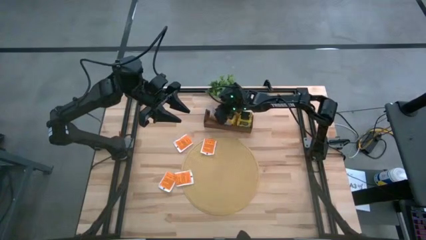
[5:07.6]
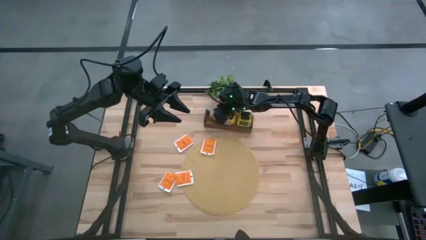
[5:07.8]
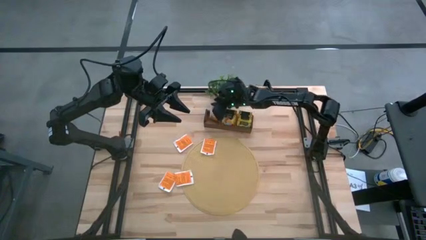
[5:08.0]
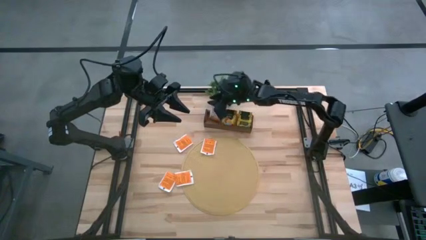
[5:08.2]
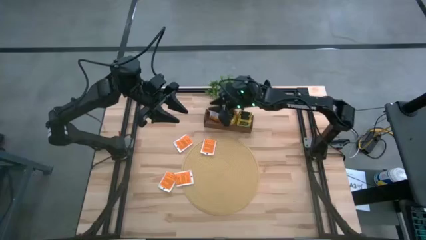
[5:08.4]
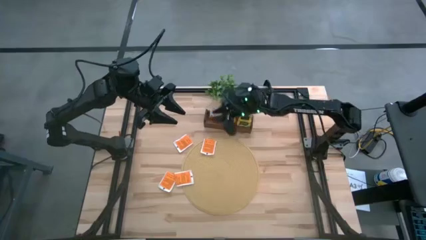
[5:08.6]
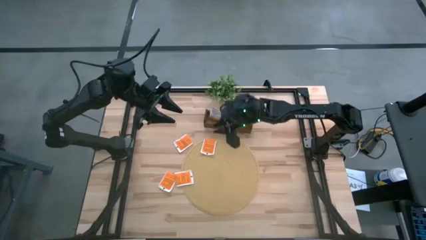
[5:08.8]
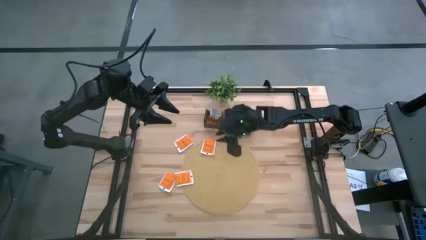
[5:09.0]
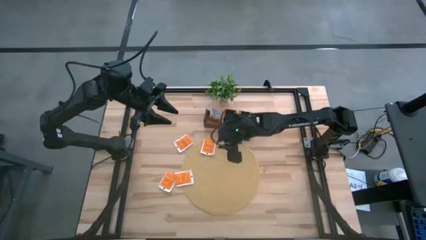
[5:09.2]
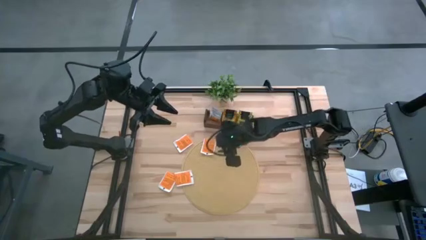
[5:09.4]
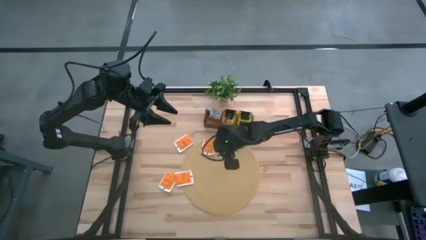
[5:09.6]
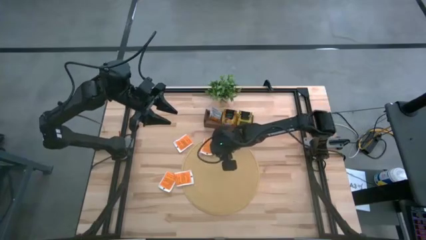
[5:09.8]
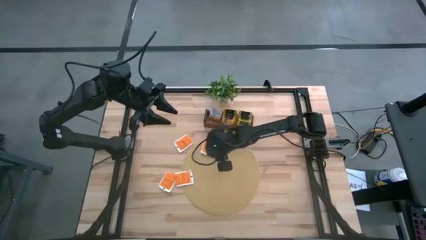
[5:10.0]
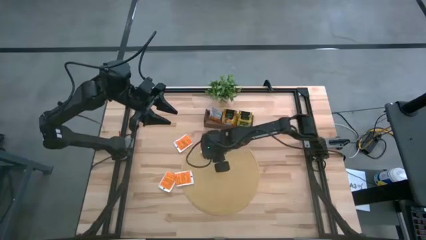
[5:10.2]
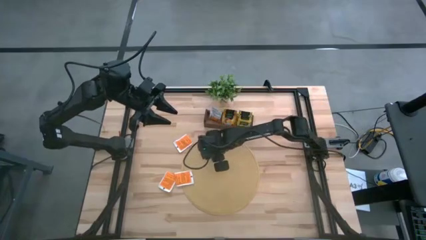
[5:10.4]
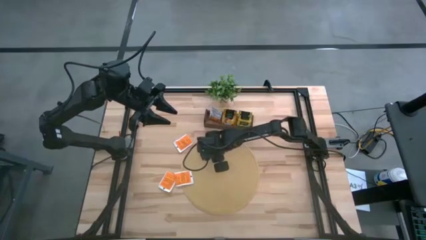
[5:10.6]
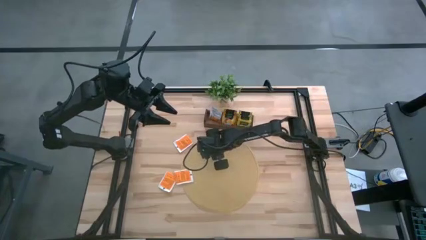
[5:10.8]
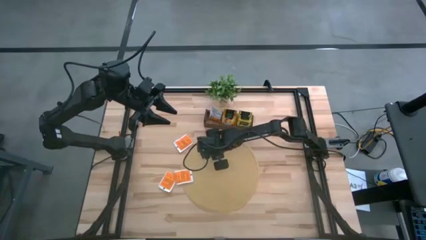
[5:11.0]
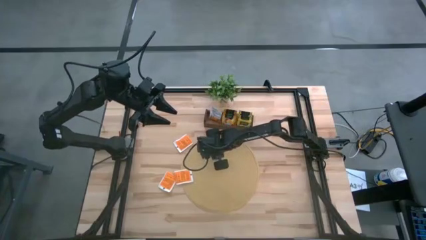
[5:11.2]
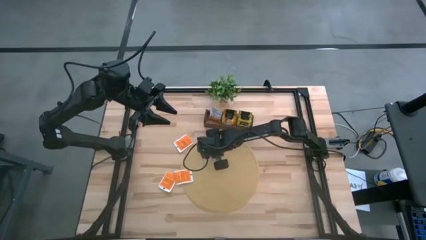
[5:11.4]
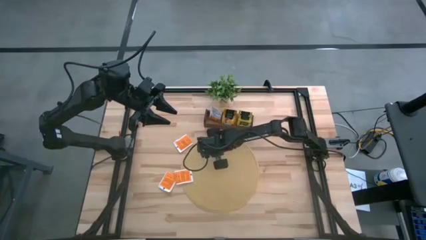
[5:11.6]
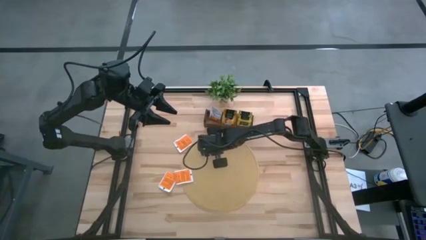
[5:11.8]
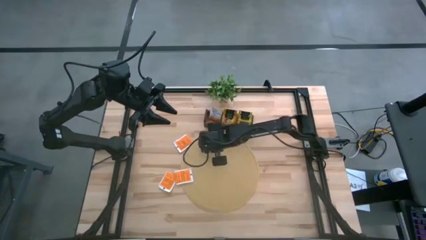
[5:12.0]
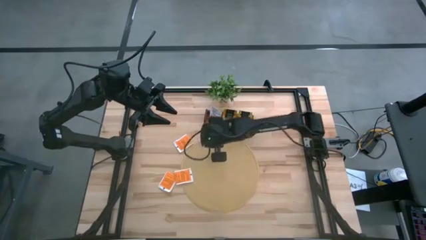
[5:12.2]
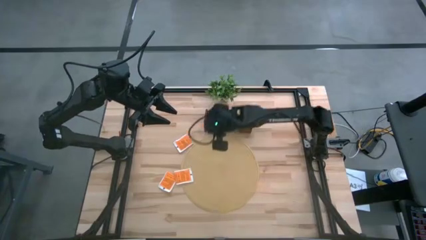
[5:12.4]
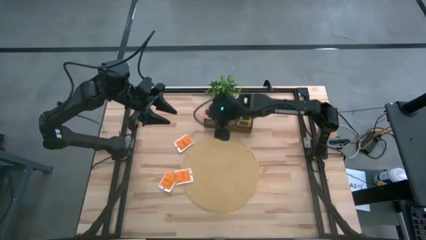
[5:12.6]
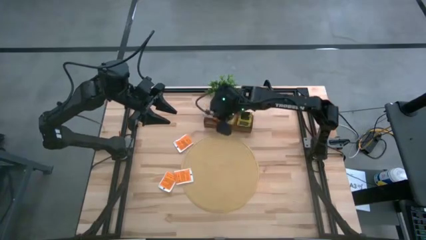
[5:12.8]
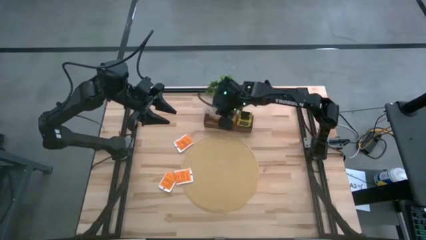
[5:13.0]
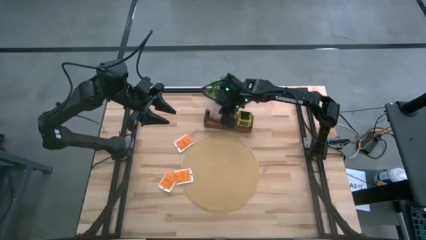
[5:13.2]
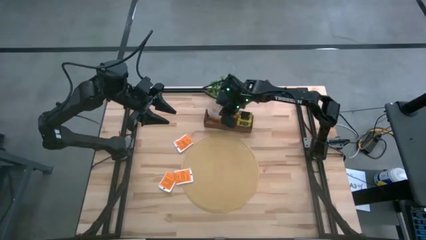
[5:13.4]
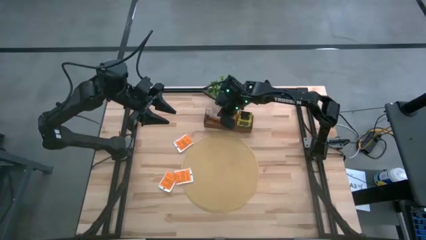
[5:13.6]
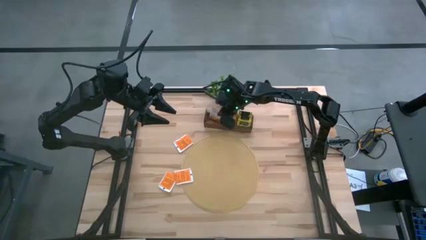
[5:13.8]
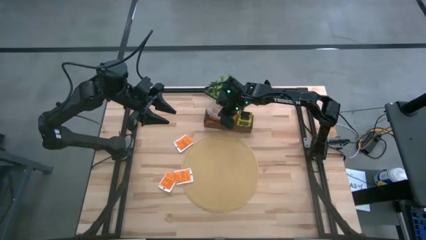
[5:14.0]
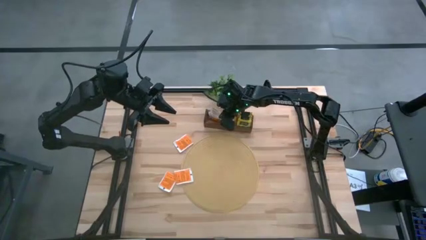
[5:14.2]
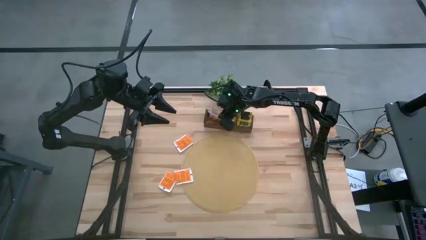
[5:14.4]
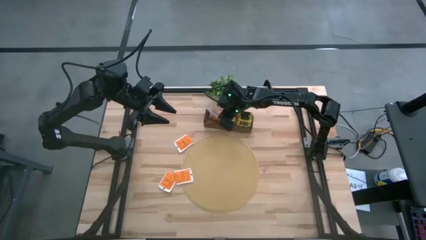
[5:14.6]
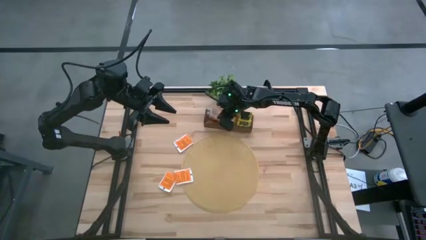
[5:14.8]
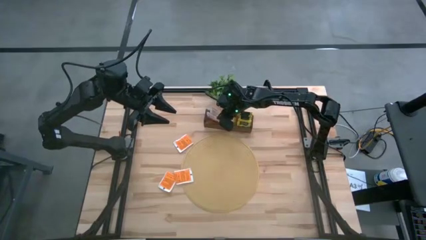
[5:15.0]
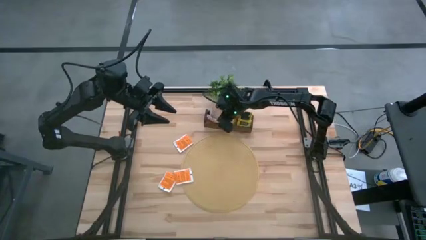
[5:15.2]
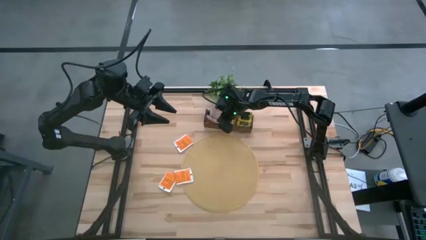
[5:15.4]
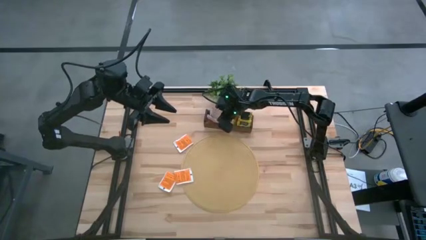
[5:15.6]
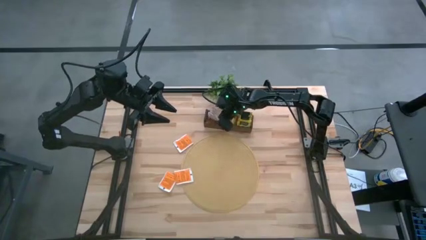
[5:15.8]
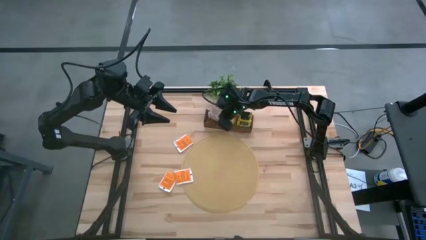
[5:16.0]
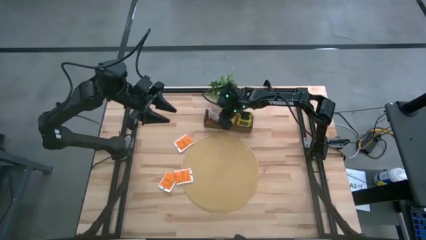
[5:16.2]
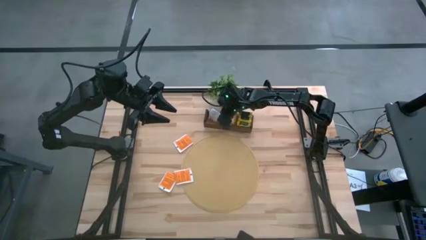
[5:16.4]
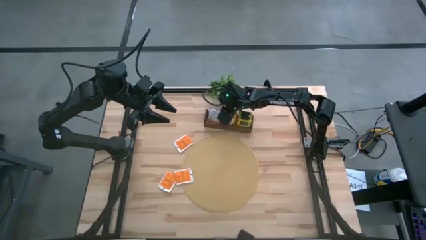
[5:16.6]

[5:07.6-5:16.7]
Task: Pick & Place Tea
Put the white tea bag into the left section of the wooden organizer

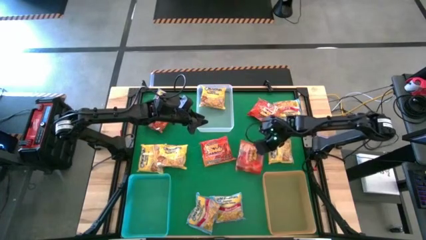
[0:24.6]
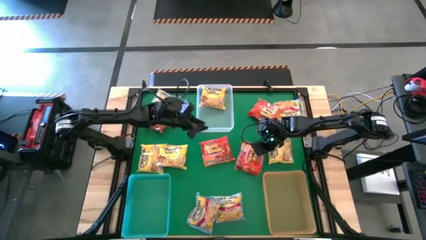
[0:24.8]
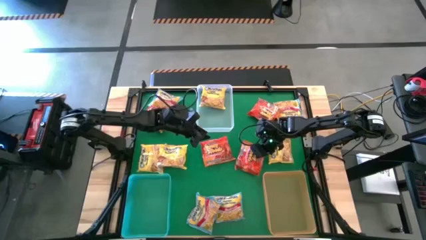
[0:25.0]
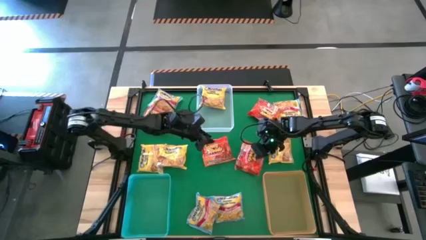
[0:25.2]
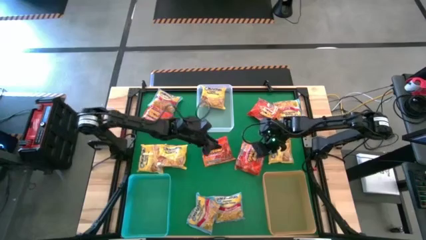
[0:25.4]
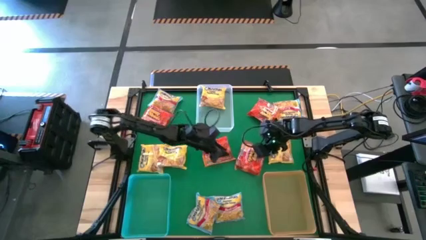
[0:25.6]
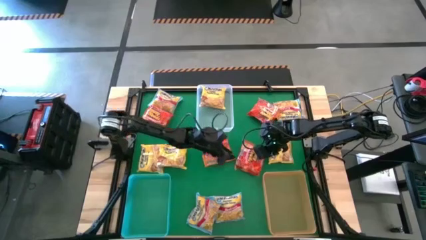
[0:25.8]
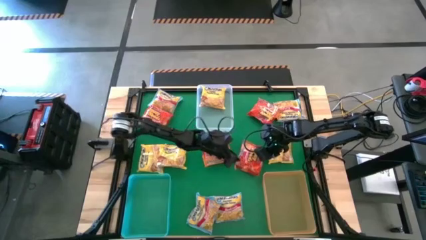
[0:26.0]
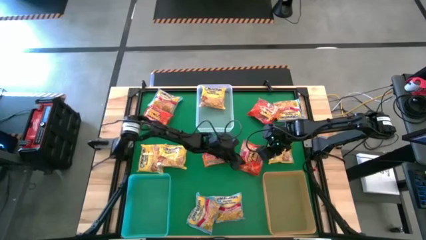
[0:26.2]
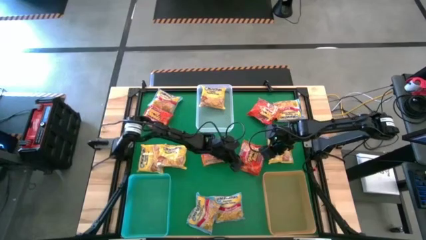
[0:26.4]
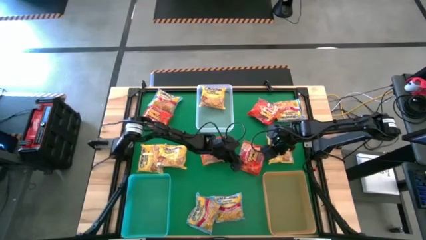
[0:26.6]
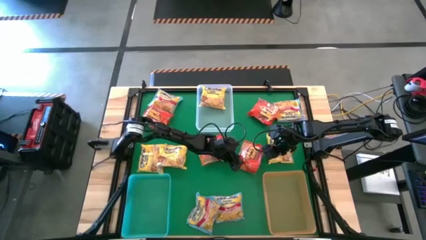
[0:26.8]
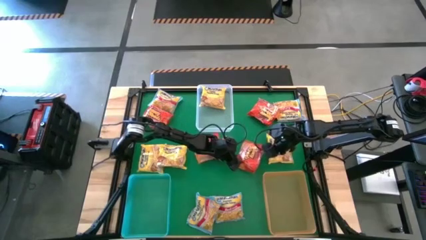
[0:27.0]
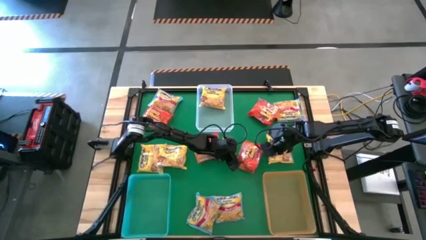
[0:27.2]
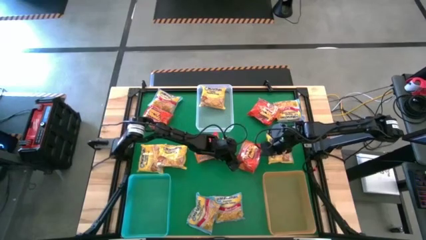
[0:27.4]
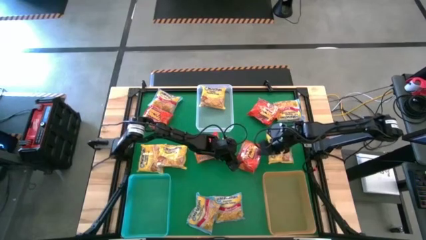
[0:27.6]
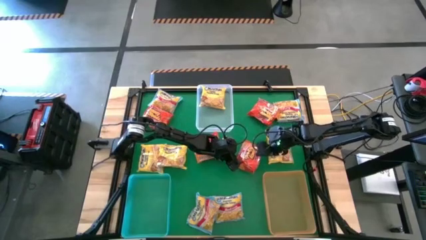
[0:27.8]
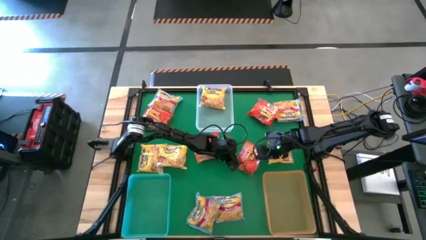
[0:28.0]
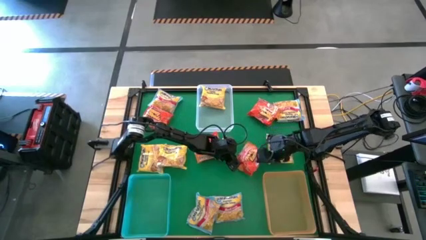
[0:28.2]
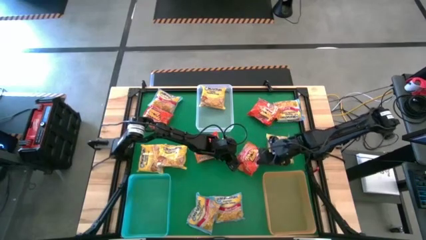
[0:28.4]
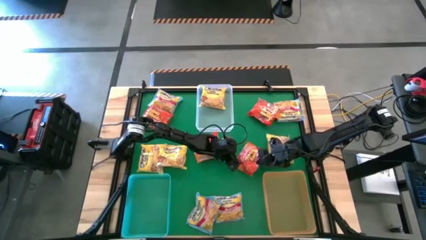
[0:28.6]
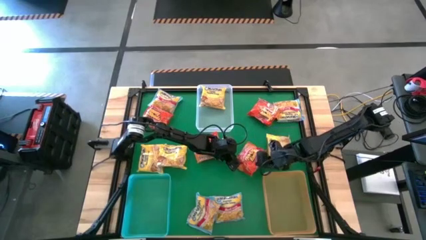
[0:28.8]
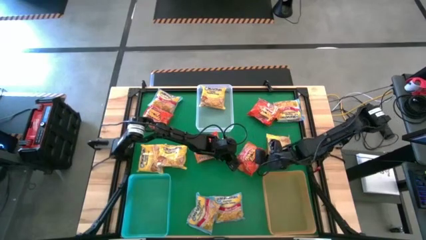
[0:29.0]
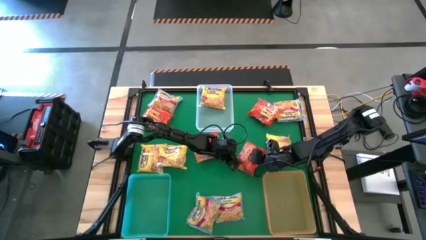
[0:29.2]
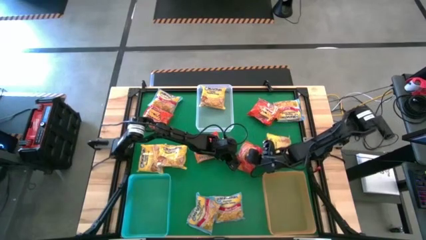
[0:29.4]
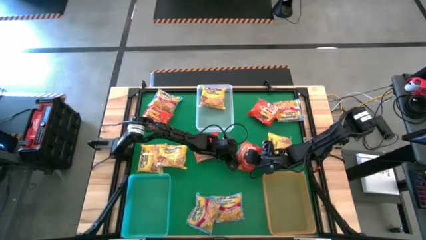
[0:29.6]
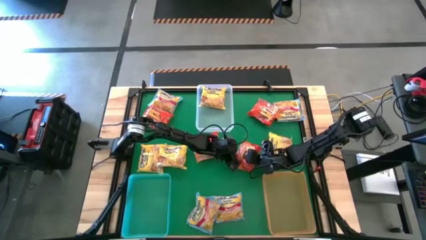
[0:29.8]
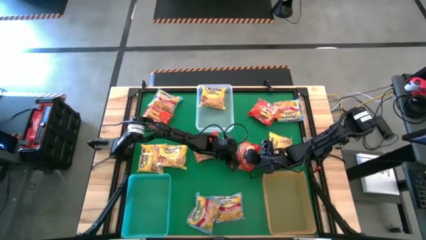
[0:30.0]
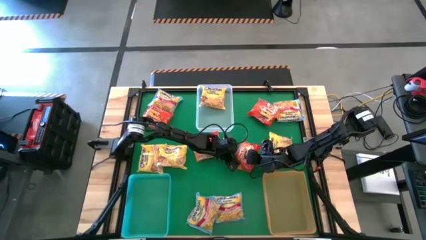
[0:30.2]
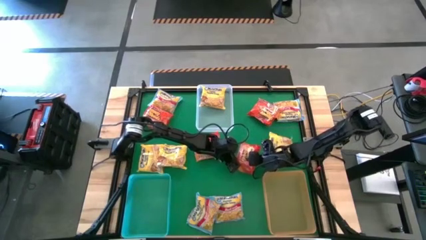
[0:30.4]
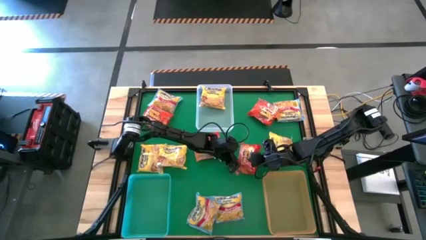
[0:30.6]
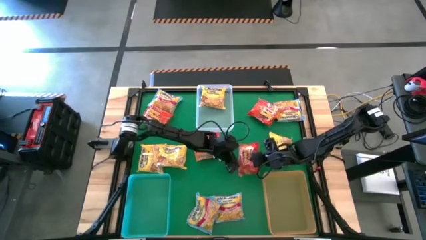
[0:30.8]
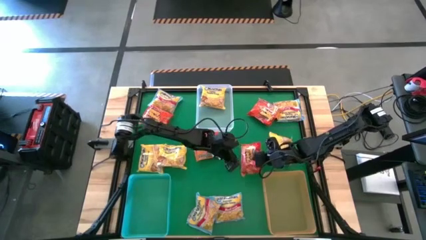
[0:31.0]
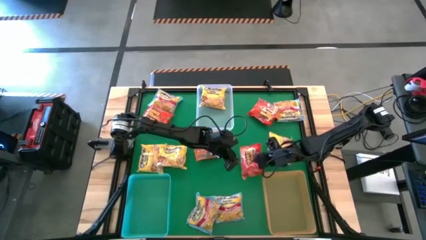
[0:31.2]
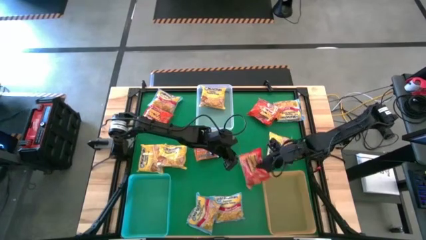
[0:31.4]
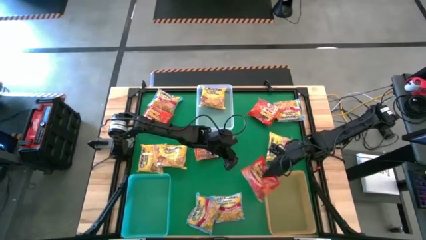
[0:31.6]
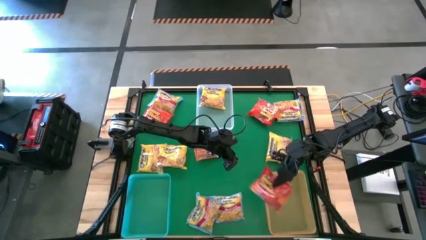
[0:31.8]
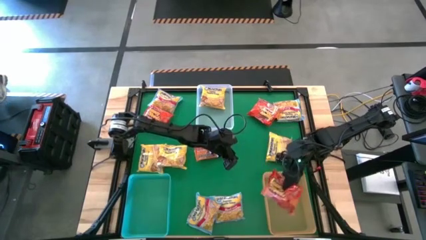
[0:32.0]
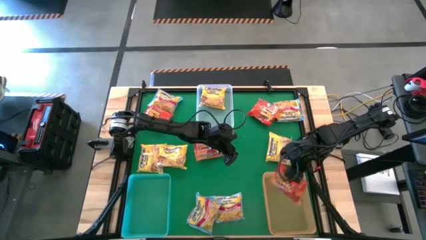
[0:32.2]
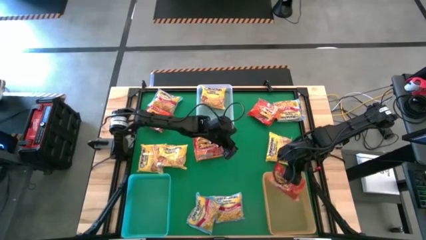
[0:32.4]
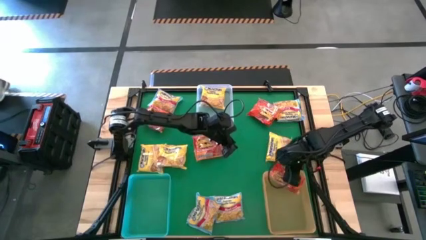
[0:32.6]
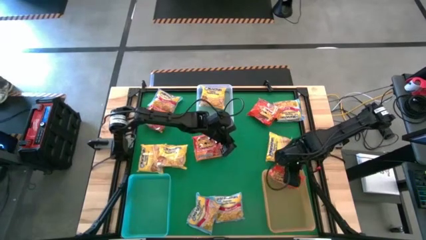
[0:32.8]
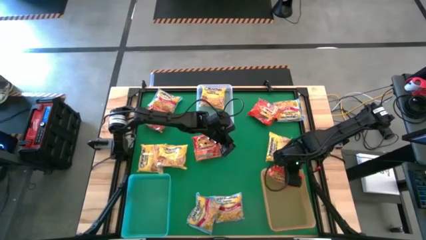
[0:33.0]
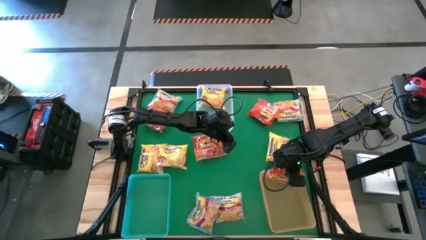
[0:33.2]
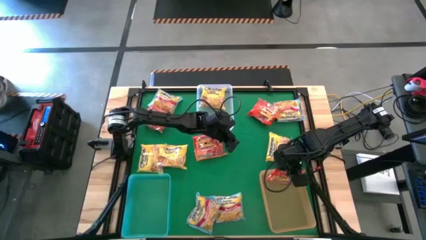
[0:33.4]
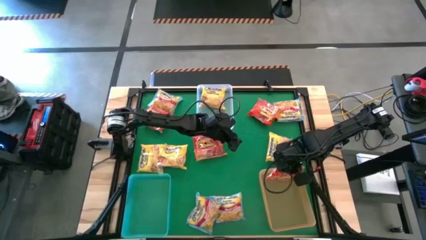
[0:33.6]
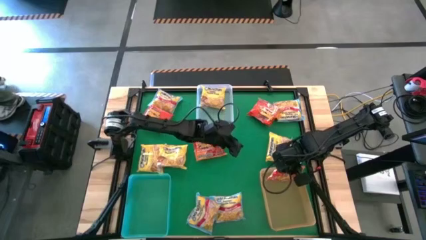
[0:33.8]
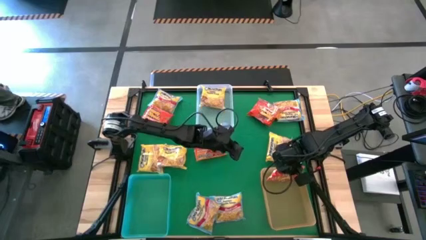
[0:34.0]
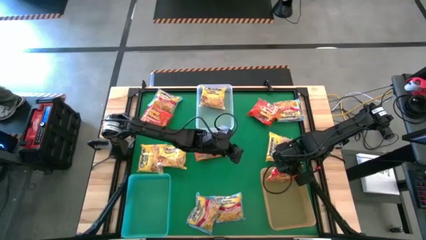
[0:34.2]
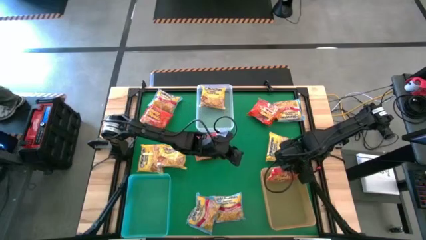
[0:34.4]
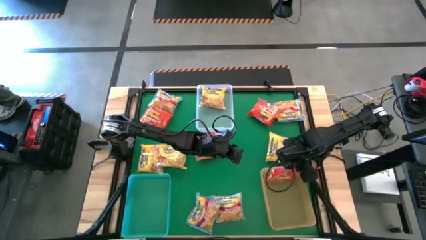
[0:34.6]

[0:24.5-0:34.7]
Task: Sort Maruchan noodles
Put the orange noodle pack into the orange bin
